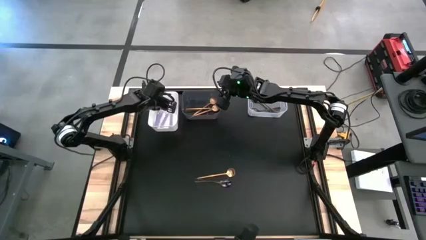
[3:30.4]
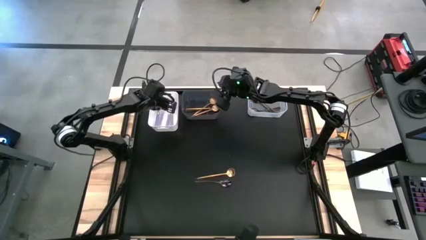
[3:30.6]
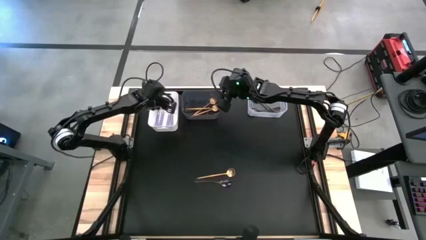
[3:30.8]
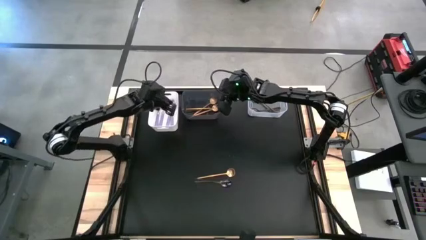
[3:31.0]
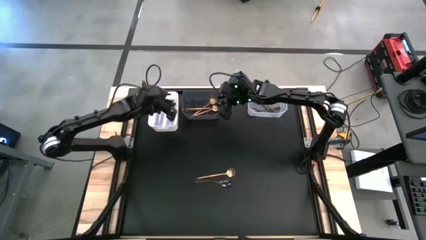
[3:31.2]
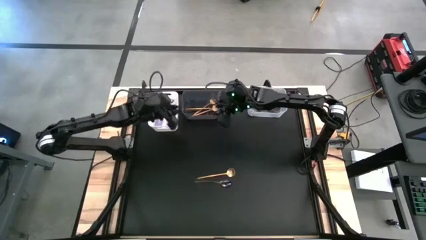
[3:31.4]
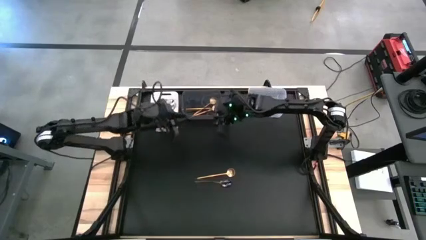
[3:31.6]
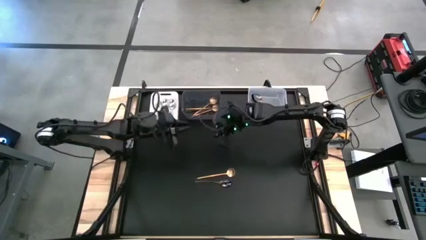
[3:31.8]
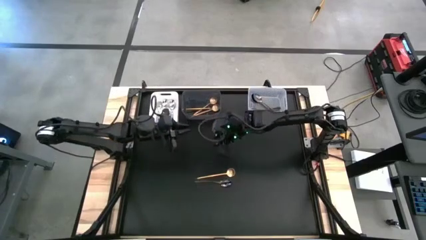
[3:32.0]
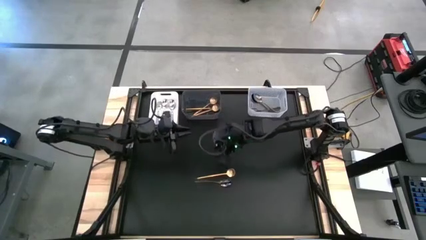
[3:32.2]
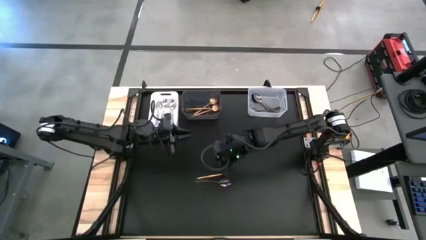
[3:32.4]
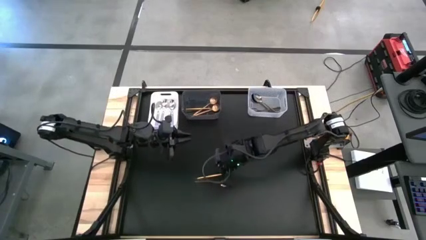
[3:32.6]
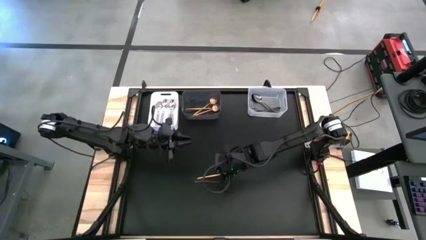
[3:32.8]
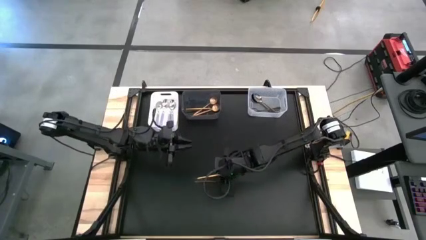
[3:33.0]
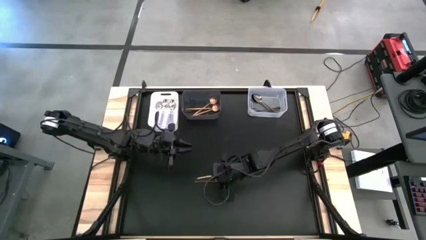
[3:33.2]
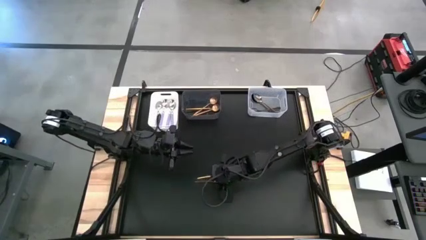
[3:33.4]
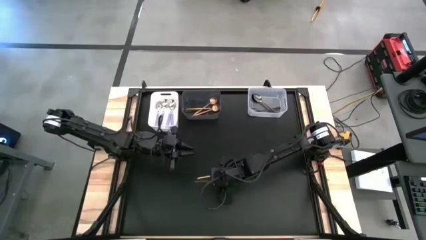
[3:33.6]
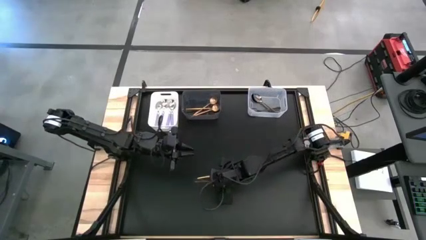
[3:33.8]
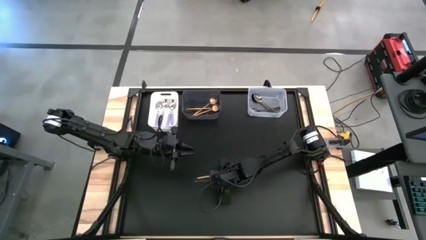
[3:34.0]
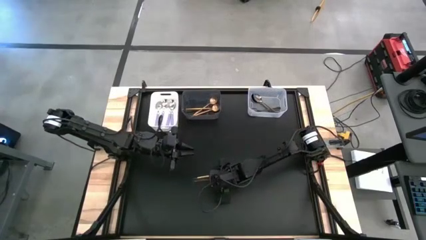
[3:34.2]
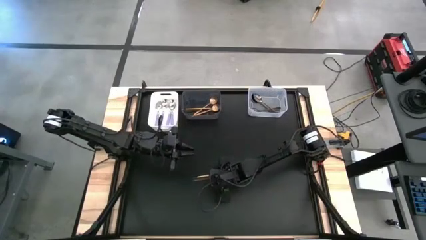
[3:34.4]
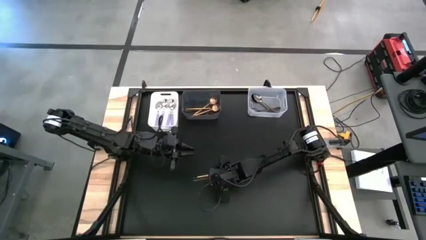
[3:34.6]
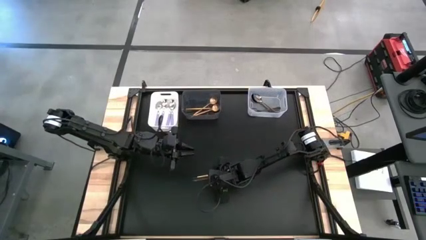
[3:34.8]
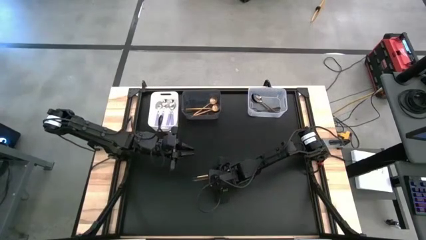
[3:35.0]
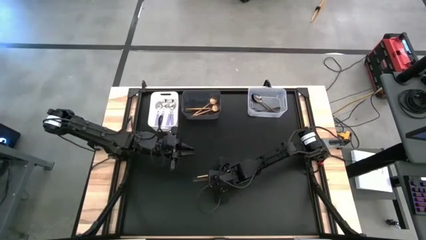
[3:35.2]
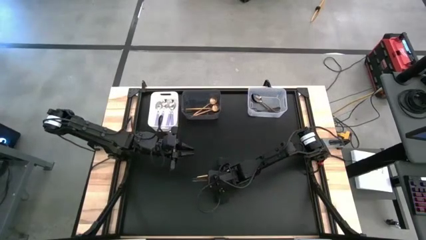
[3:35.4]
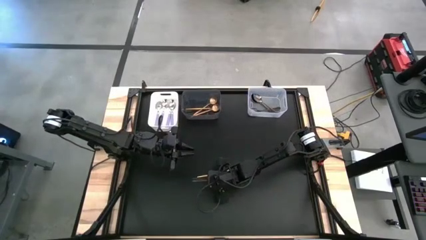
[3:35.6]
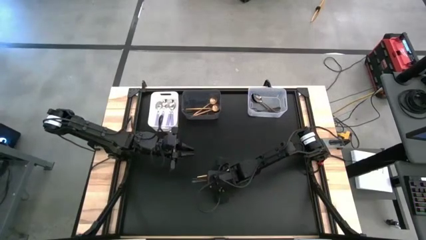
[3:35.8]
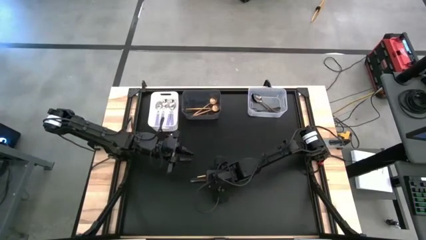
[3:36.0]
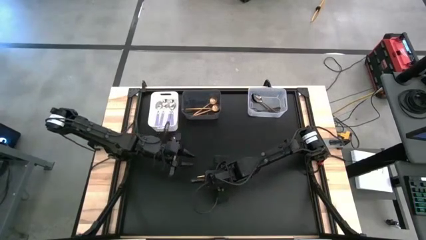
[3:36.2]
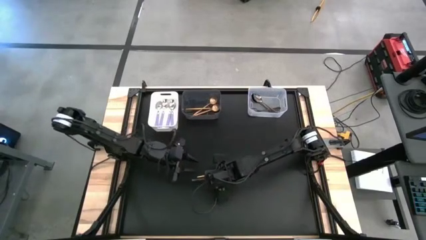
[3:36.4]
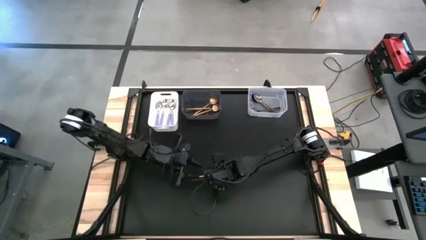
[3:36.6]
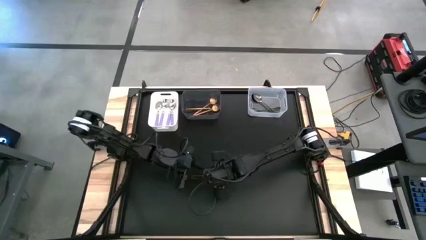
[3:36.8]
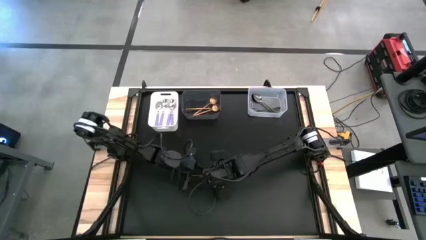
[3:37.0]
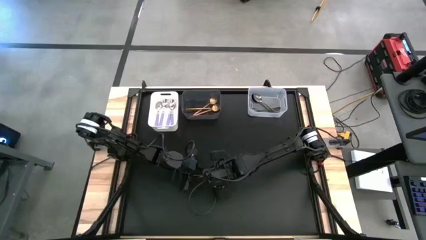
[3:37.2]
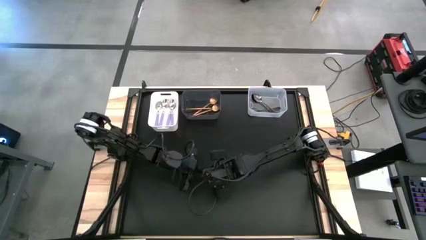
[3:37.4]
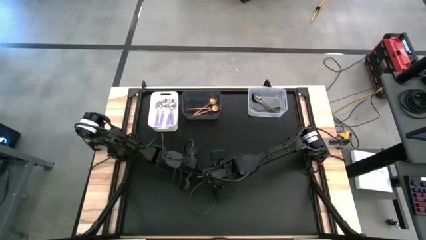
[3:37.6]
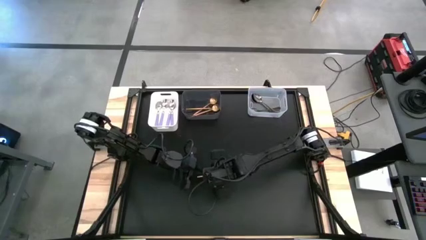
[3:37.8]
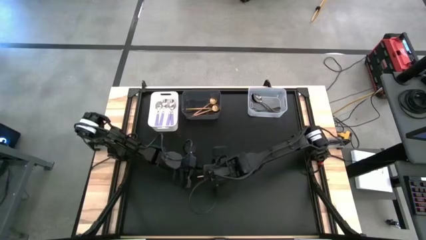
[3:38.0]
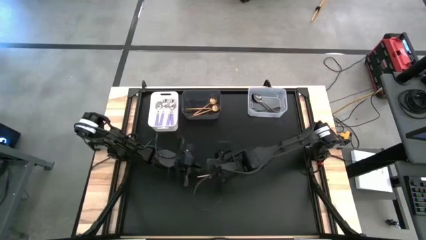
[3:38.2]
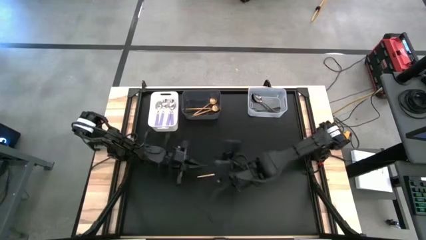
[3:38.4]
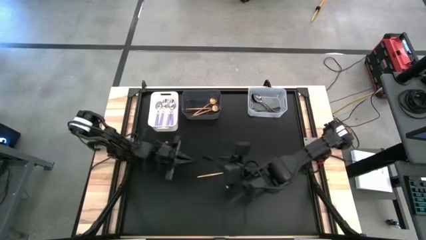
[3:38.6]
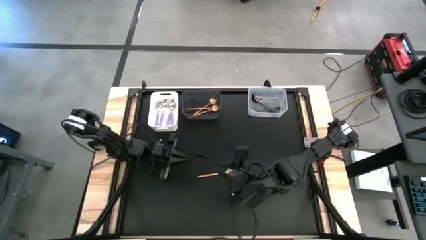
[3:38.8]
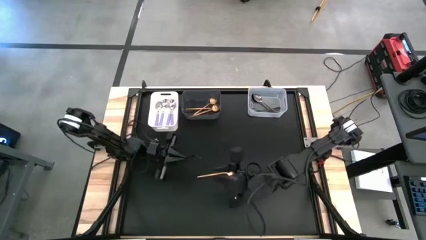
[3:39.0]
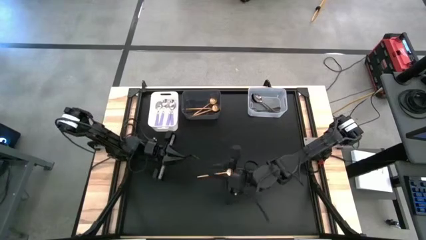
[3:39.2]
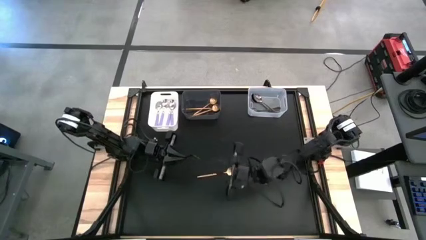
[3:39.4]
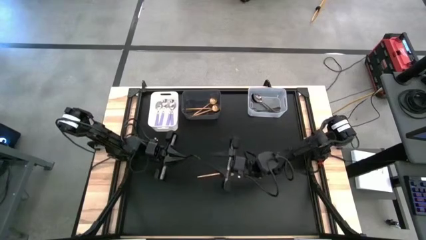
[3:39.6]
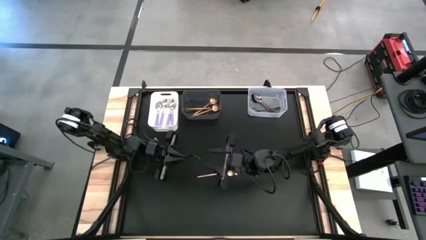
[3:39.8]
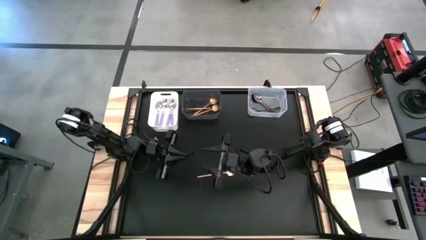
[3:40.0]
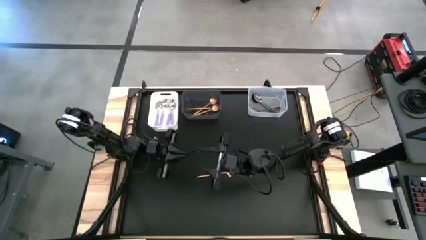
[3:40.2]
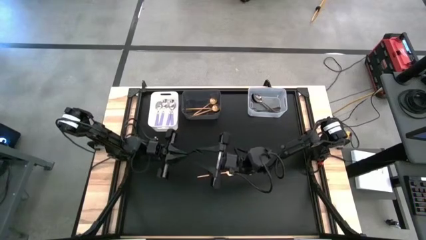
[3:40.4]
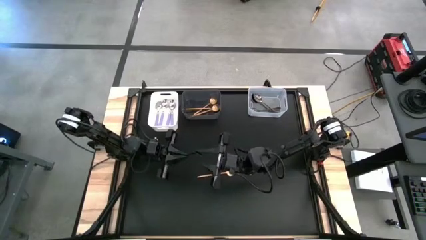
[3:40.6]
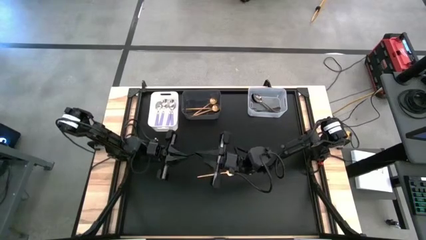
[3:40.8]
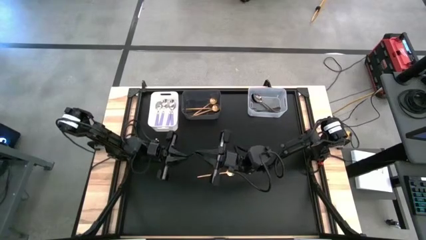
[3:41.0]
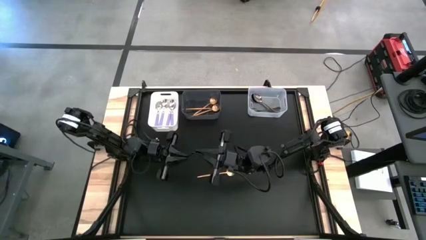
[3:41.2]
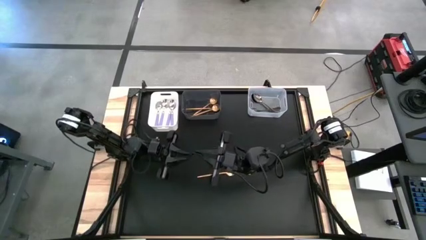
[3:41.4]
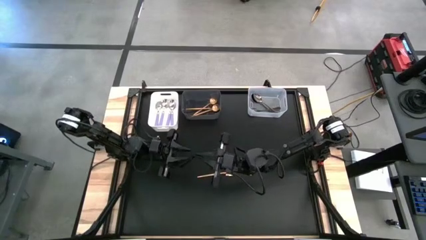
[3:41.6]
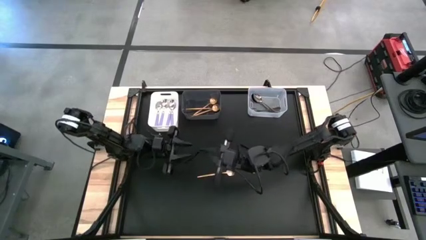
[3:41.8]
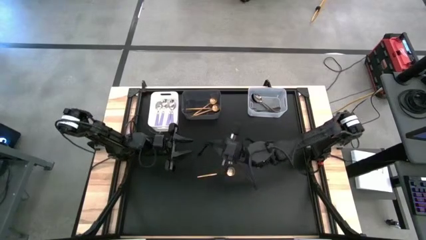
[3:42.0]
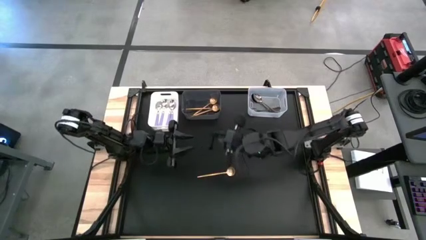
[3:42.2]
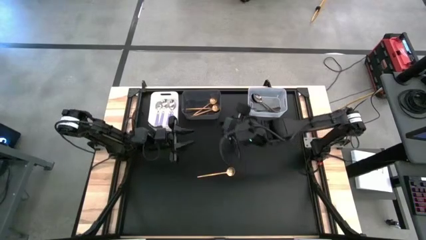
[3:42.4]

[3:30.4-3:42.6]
Task: Sort silverware by color (type)
Put the black spoon into the transparent bin
